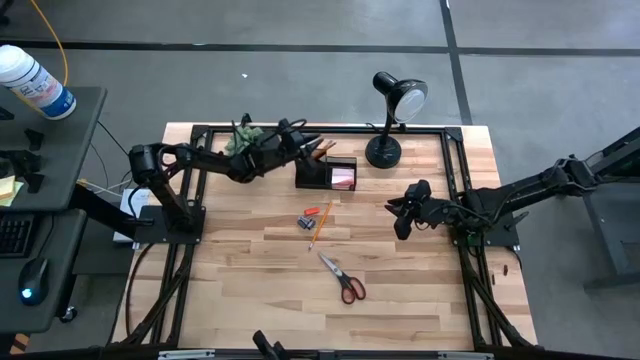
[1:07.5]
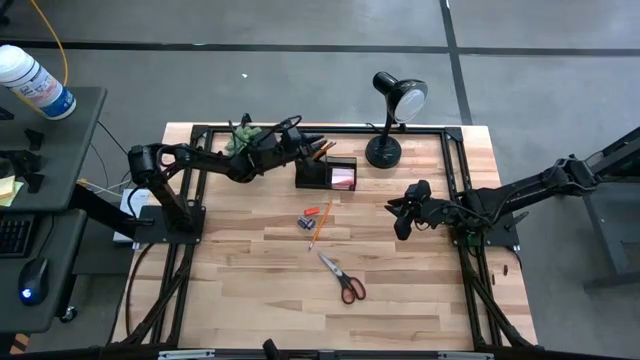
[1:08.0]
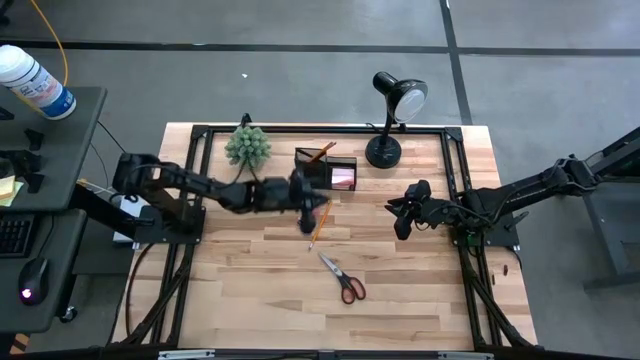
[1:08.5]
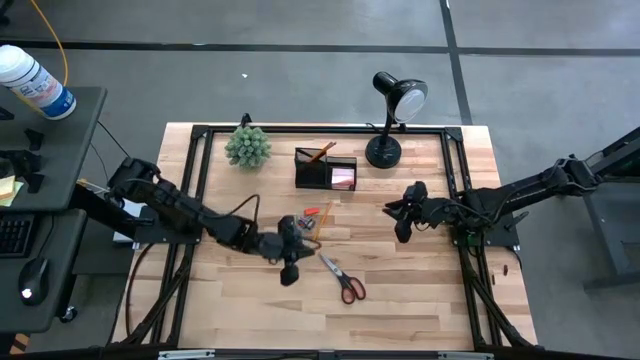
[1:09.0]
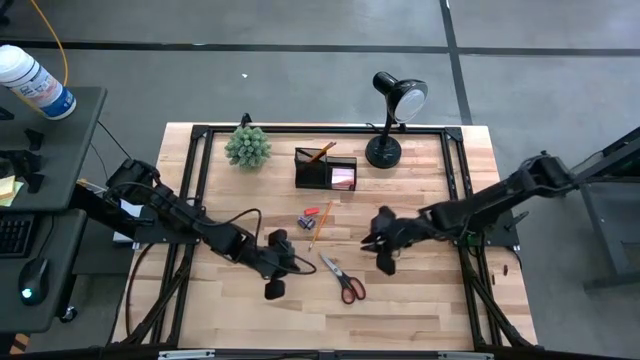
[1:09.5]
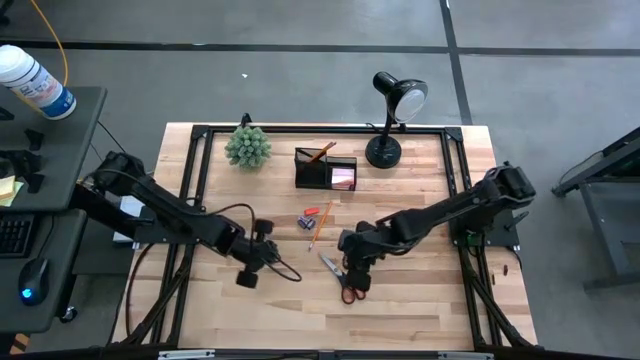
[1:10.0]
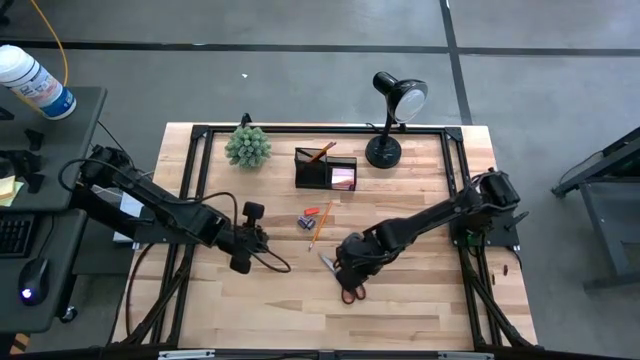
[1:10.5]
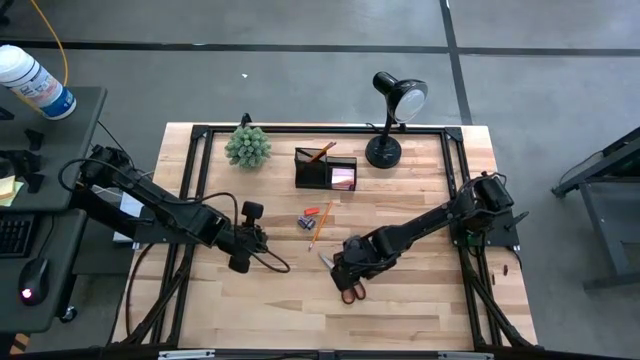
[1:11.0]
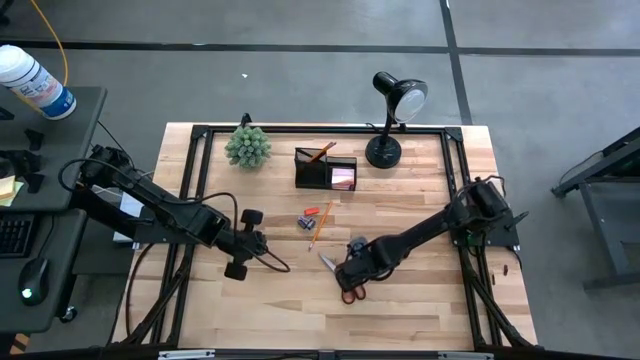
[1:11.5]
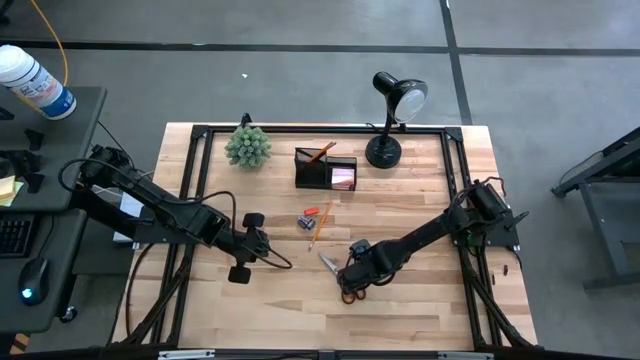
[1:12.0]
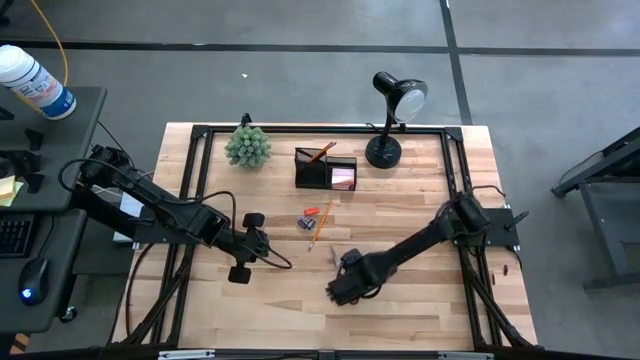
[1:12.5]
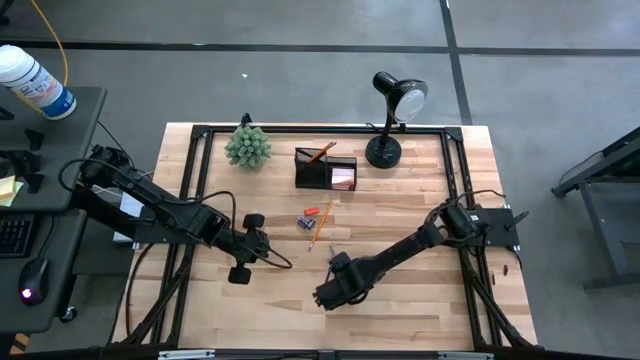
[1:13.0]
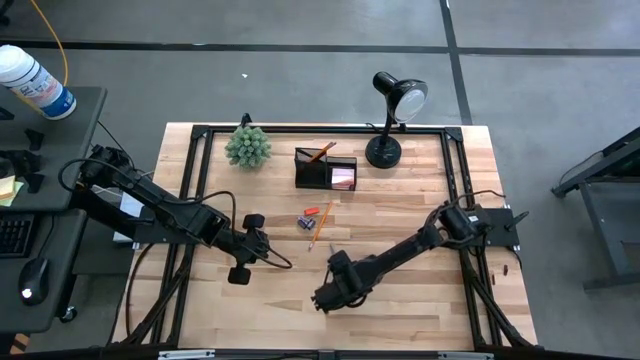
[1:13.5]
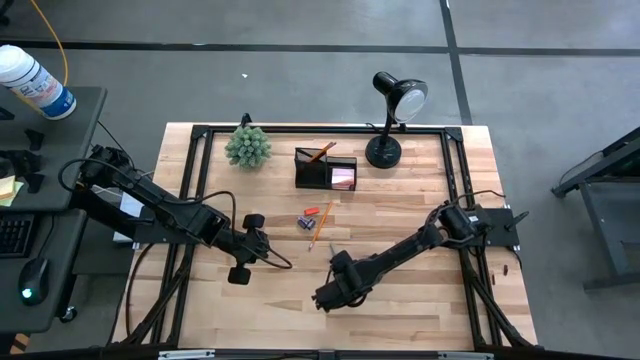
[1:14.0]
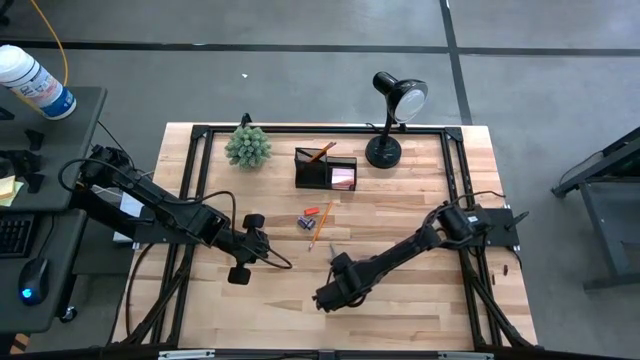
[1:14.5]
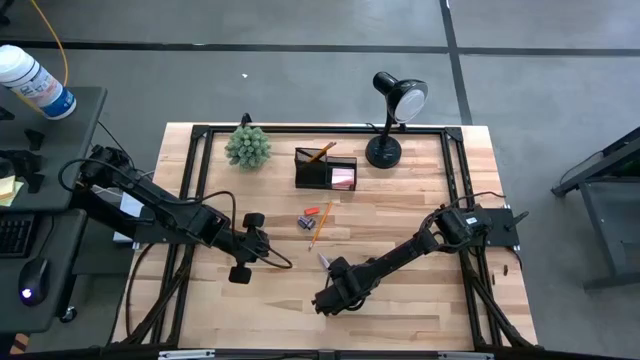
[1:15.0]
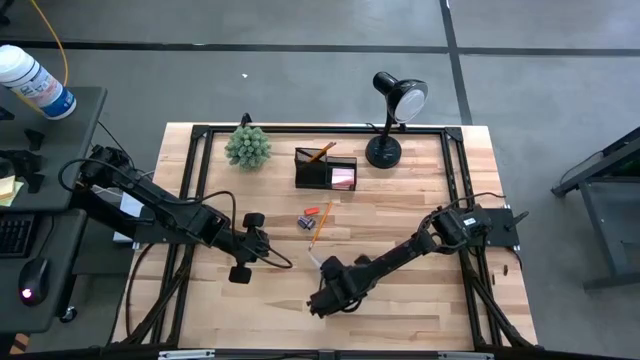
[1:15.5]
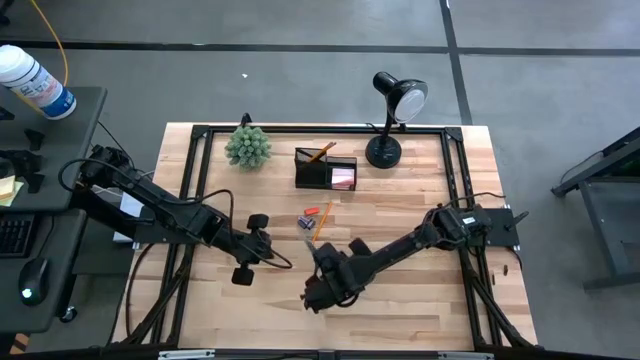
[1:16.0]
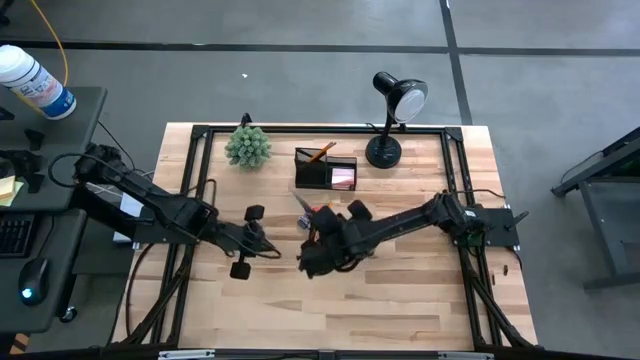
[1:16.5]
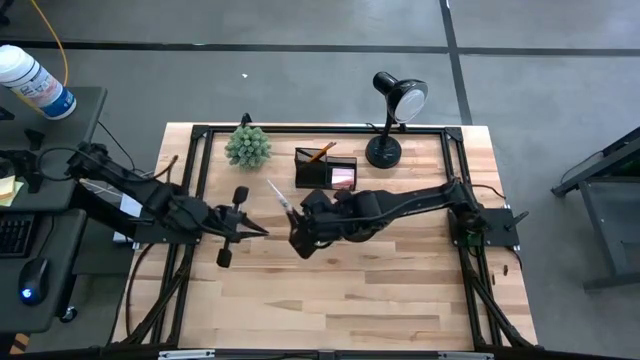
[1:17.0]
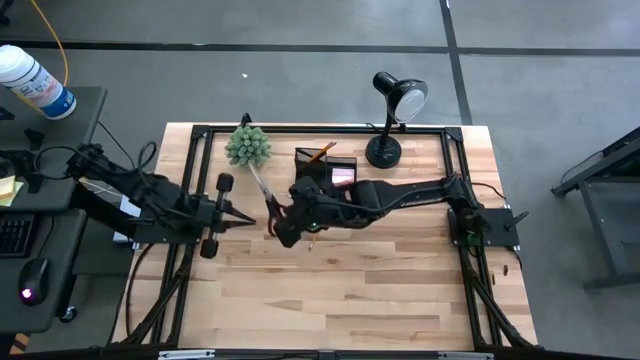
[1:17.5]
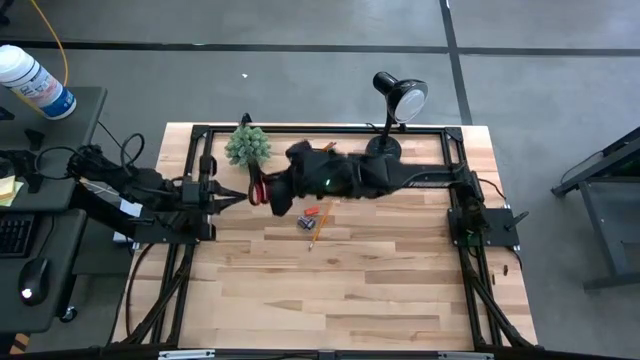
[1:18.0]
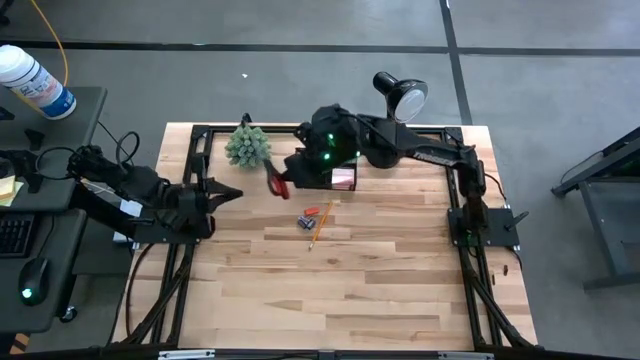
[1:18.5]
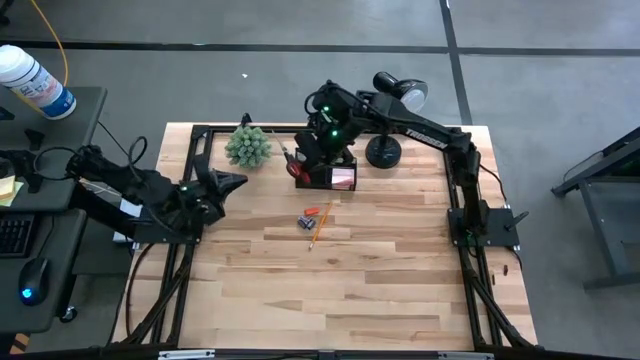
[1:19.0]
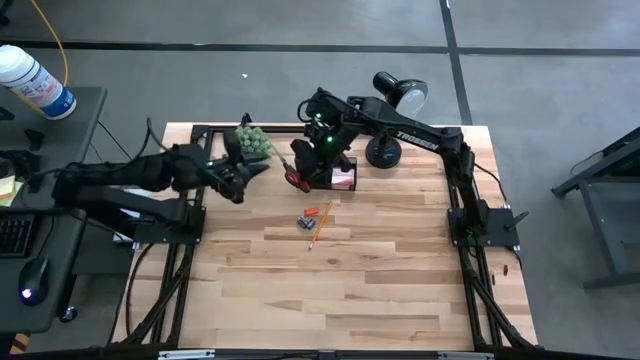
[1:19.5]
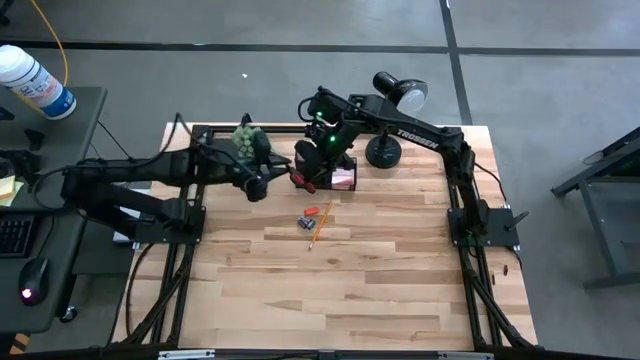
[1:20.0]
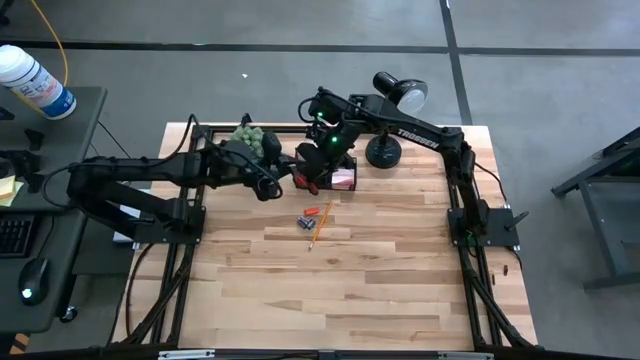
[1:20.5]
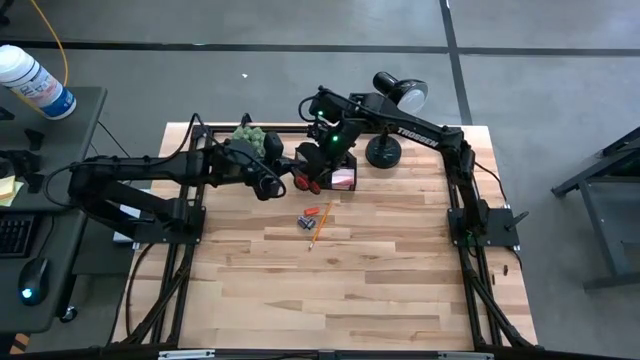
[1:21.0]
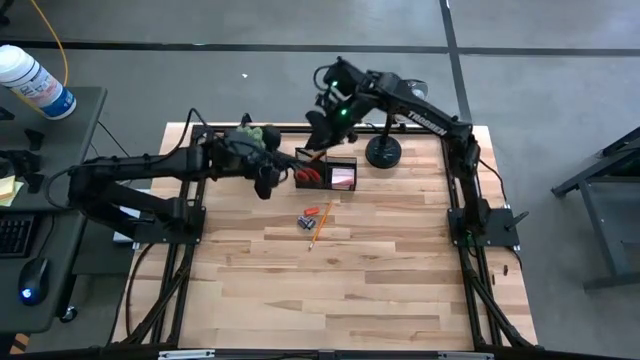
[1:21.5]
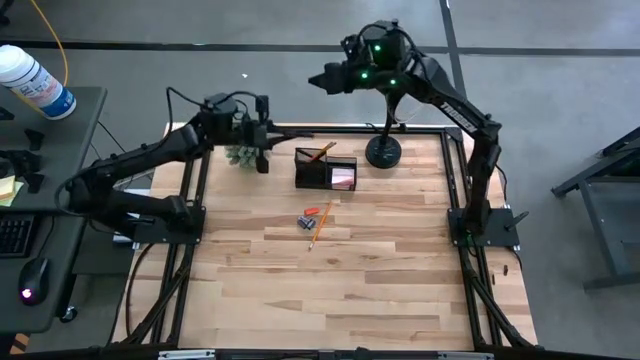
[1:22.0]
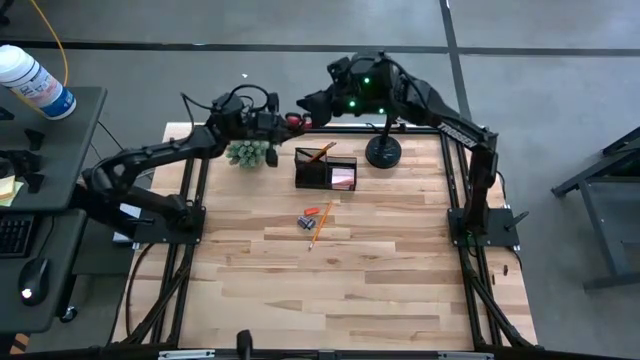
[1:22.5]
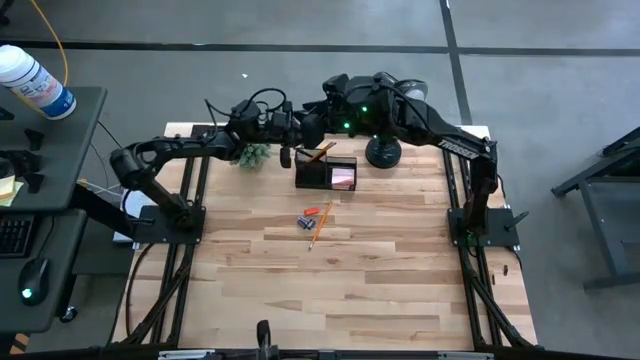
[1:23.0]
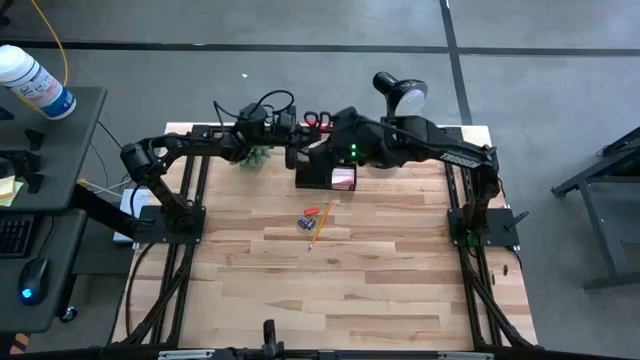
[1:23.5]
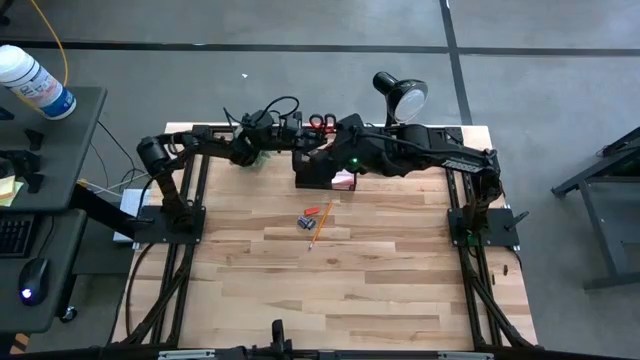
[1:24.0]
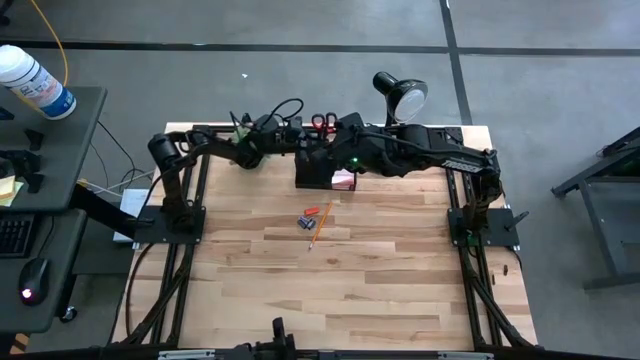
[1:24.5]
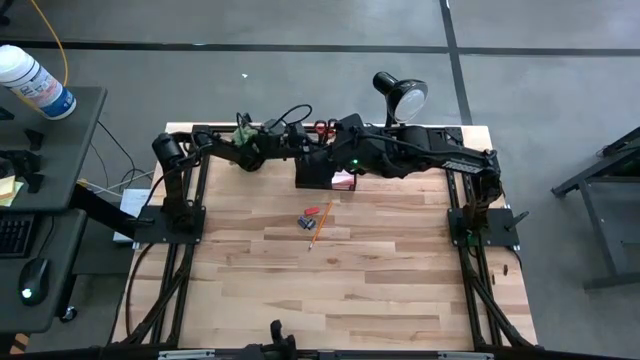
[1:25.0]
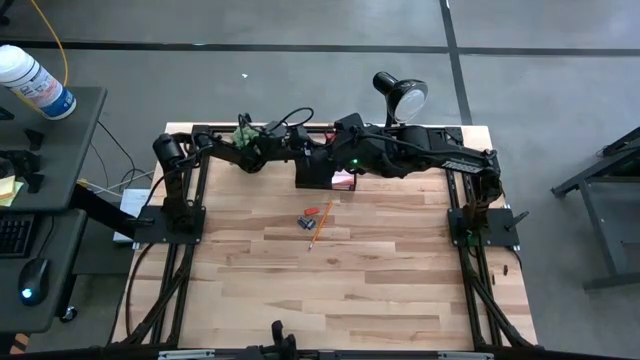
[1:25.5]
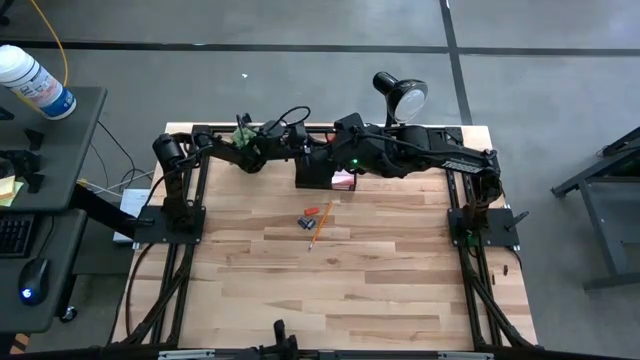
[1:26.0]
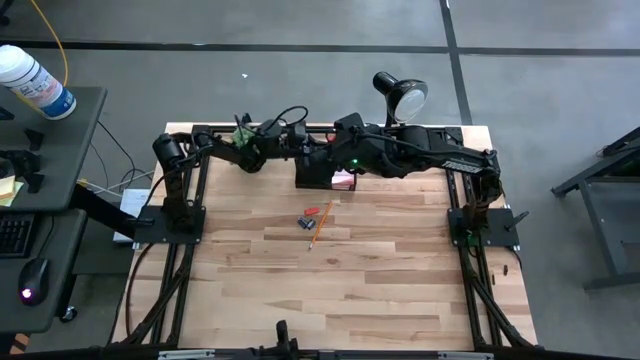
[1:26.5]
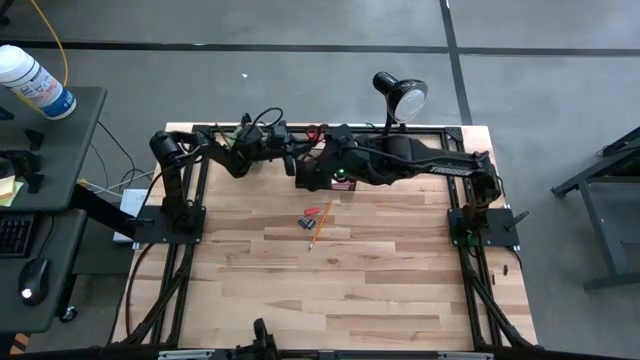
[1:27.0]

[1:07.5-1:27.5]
Task: Pick and place office supplies into organizer
Put the black scissors into the desk organizer
